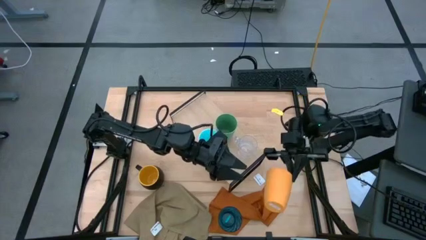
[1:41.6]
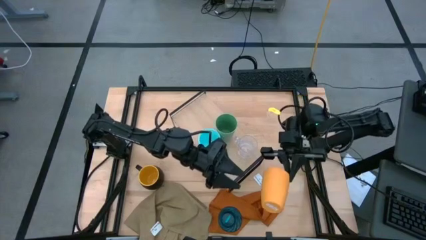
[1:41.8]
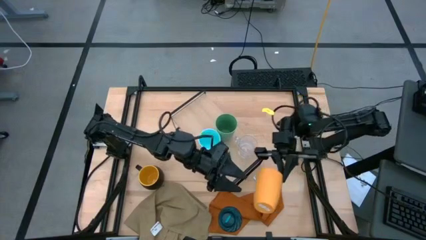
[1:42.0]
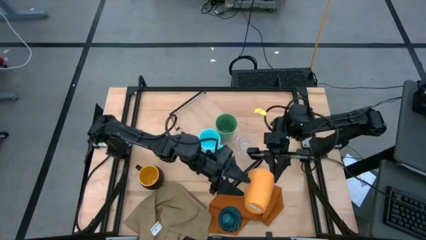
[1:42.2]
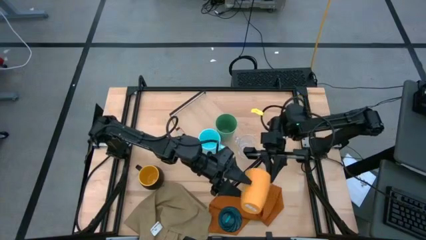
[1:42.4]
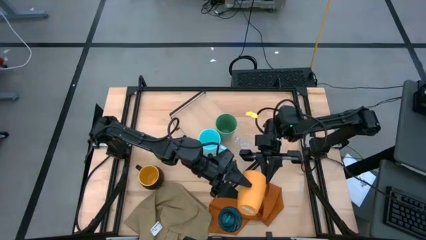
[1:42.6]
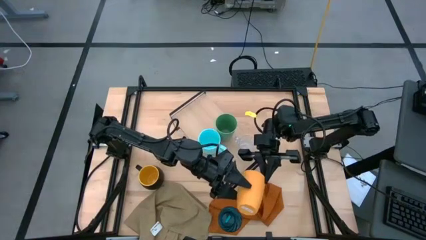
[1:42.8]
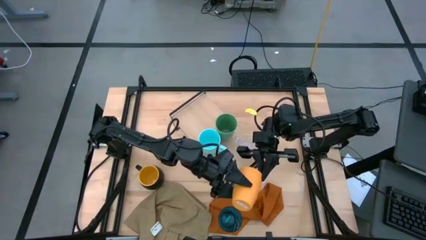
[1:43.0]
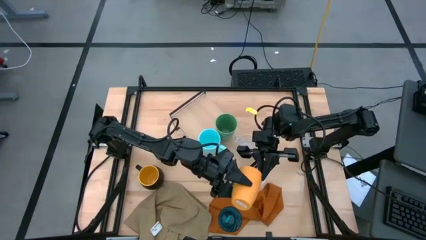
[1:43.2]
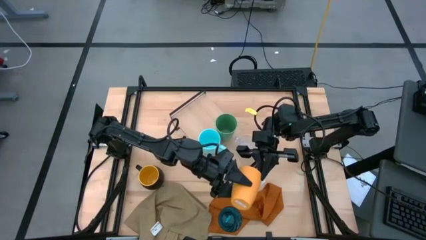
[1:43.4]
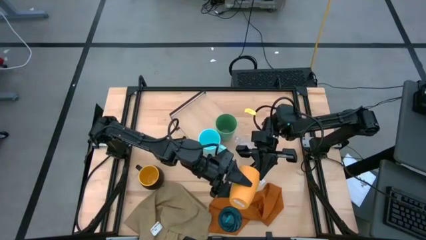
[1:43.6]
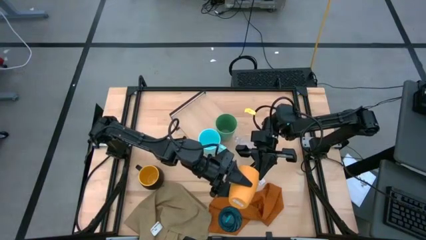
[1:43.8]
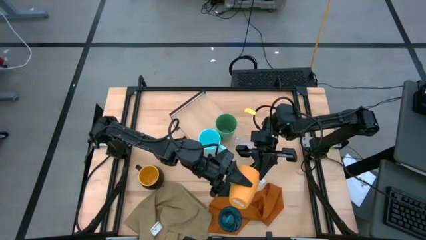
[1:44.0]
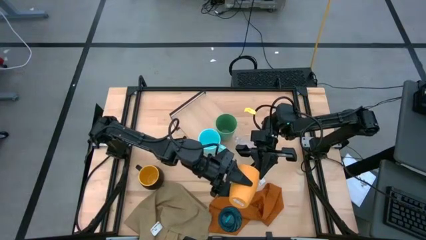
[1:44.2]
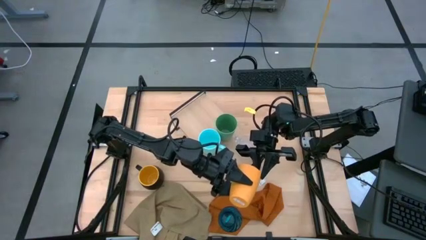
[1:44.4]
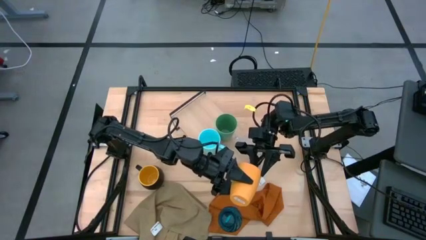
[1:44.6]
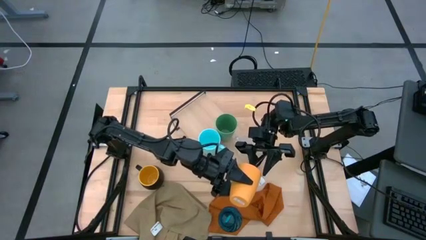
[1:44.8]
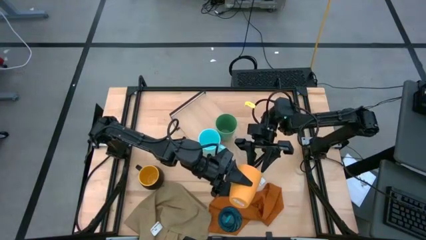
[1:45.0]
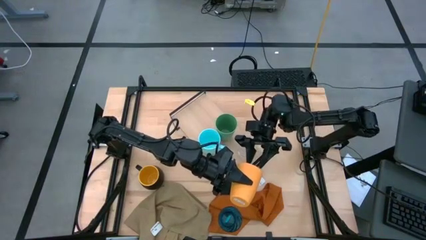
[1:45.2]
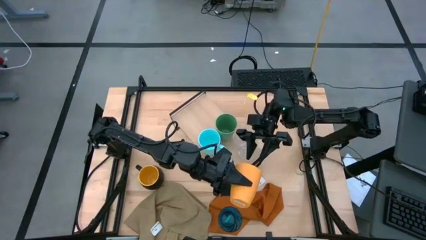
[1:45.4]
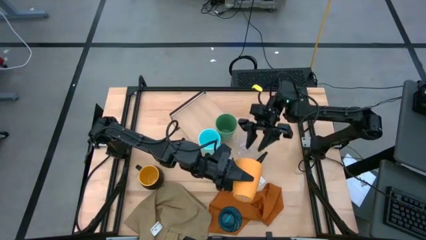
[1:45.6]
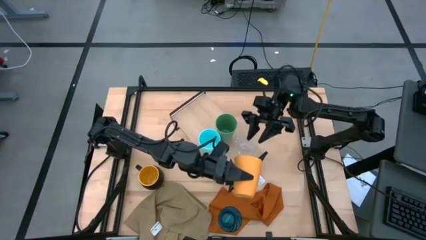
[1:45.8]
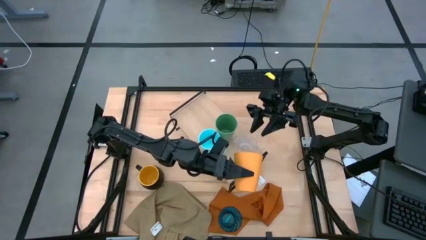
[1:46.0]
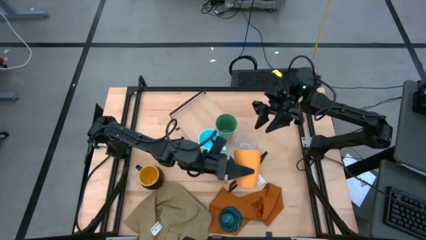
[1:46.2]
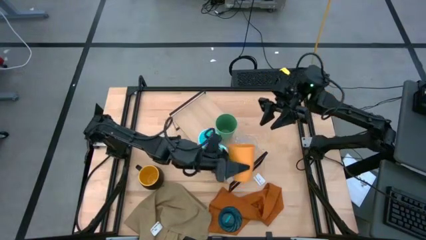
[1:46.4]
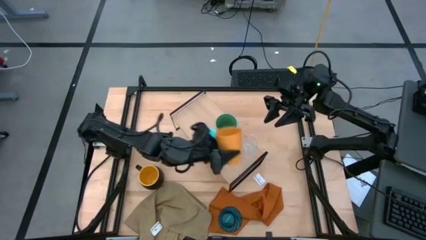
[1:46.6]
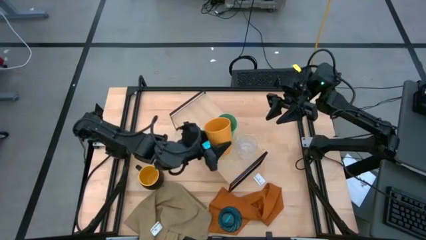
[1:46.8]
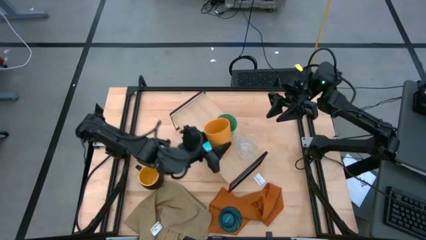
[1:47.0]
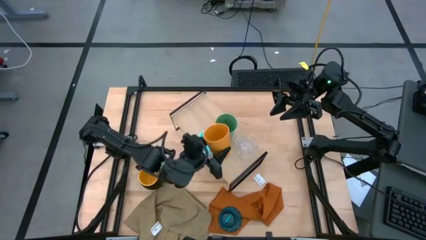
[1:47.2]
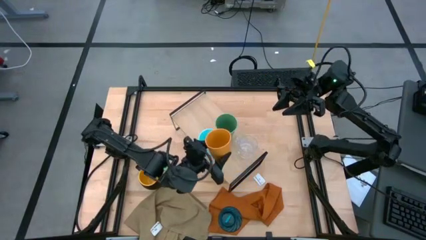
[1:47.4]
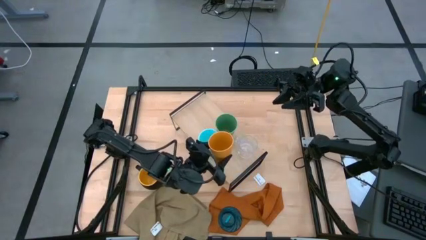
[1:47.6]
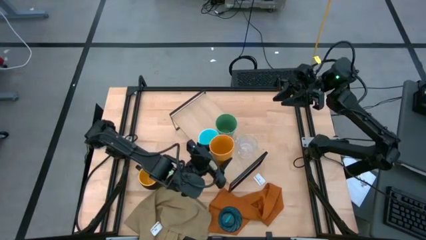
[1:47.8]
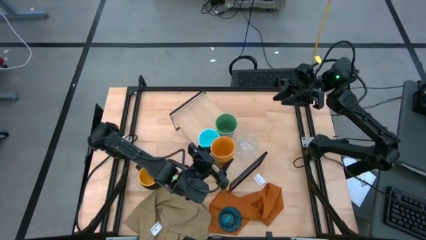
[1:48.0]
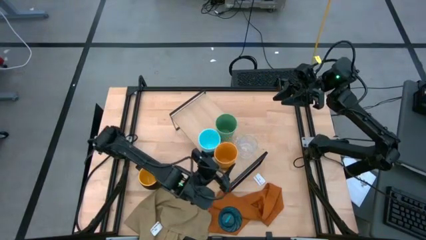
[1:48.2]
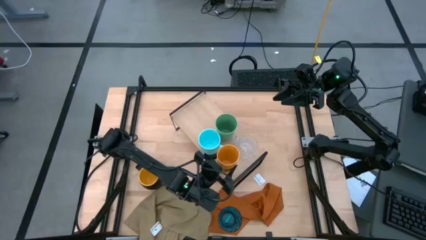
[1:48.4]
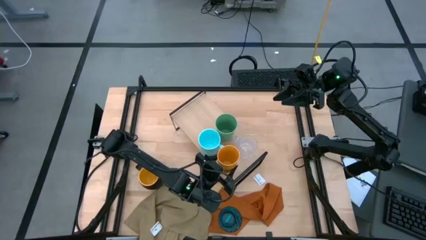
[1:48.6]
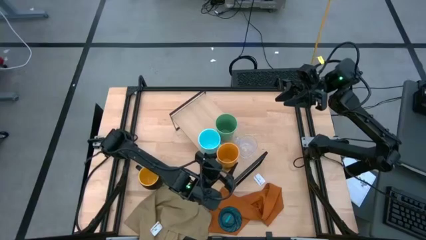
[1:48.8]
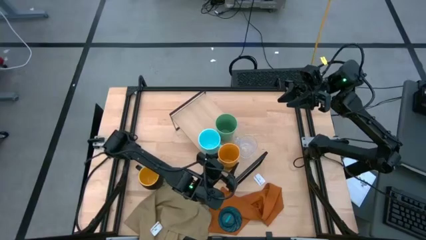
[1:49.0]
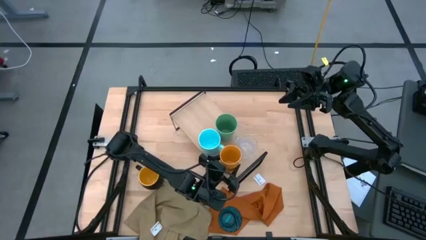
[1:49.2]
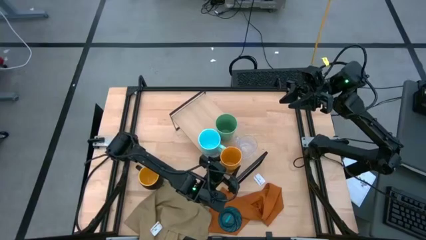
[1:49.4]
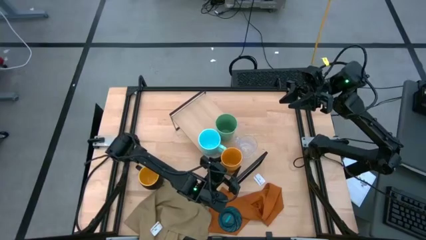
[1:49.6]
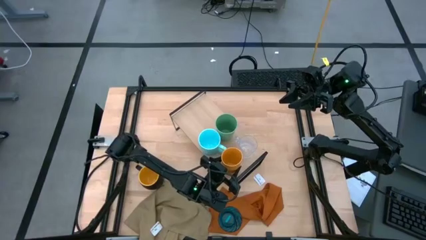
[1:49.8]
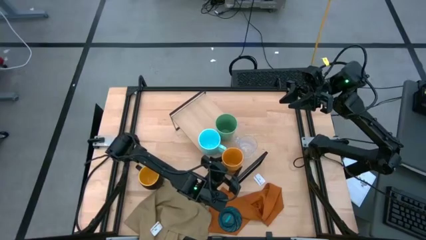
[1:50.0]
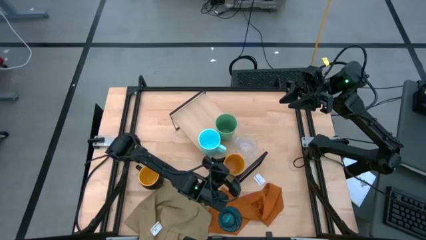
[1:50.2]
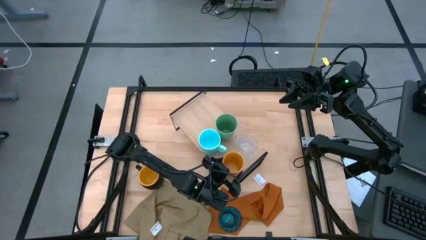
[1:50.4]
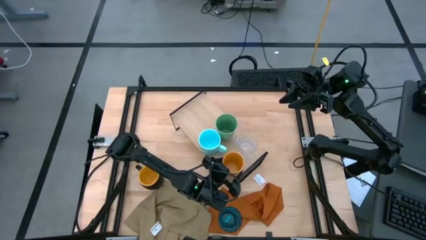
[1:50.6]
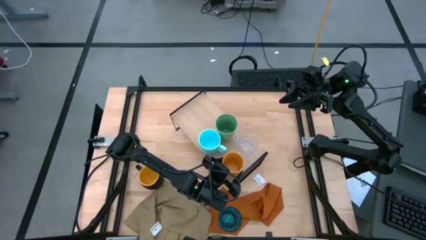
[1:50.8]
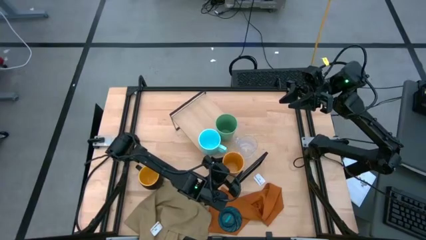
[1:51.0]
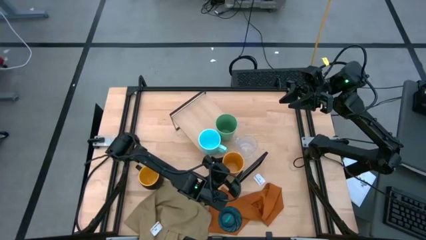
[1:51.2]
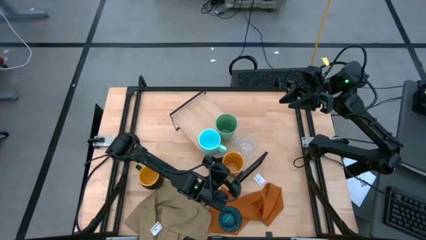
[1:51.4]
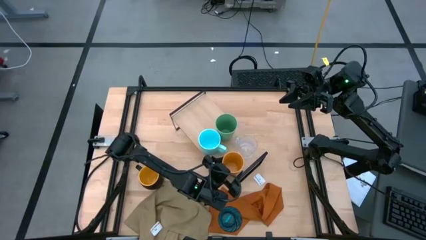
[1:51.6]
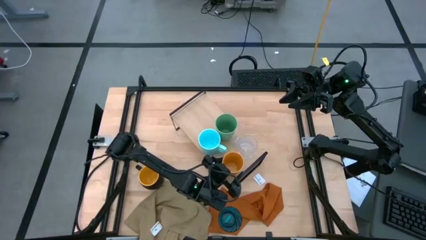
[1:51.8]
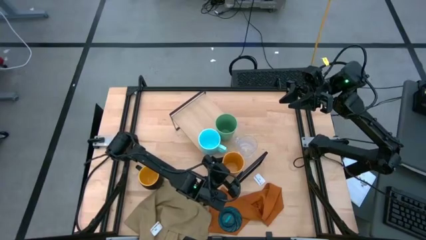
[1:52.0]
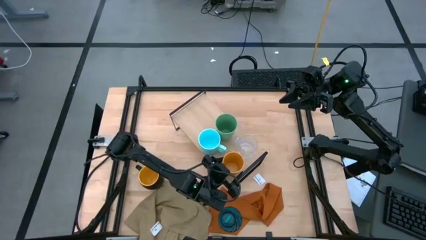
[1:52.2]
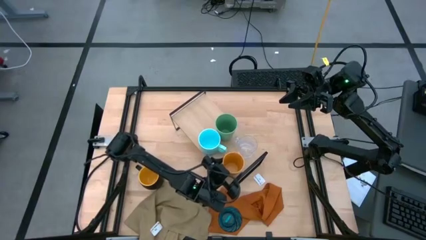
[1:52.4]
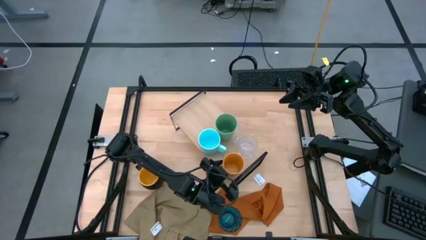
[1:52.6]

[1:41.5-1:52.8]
Task: Stack small to large cups/mugs on shelf
Put the yellow cup on the shelf

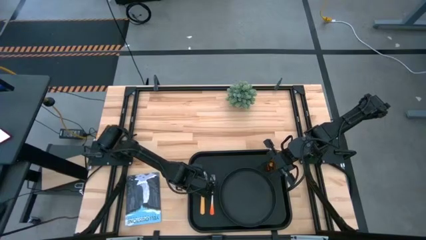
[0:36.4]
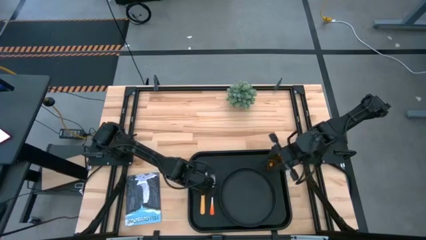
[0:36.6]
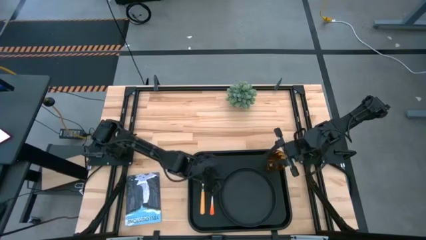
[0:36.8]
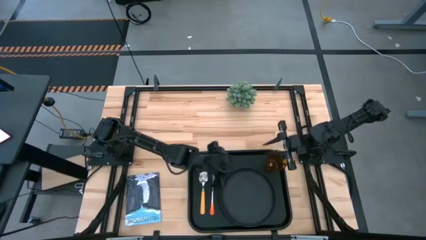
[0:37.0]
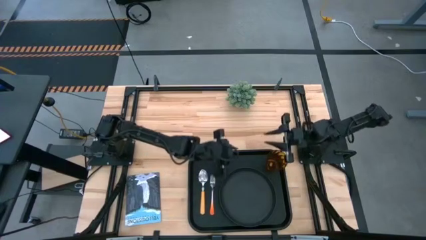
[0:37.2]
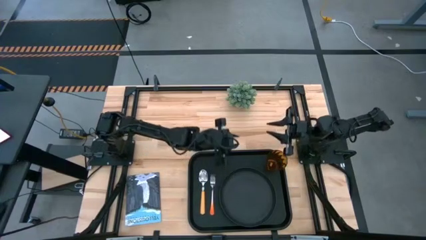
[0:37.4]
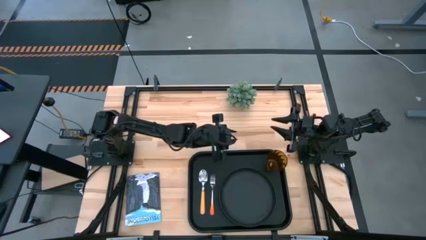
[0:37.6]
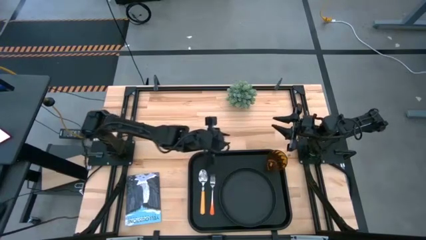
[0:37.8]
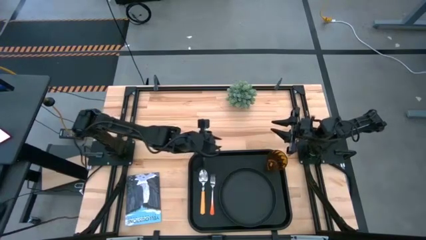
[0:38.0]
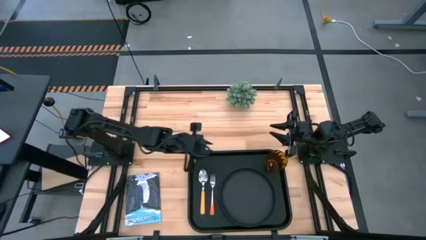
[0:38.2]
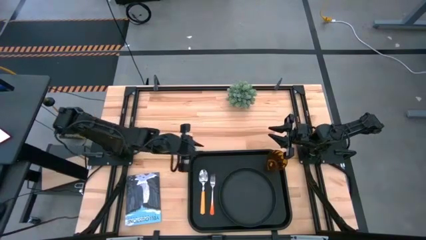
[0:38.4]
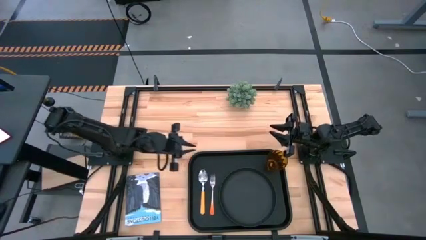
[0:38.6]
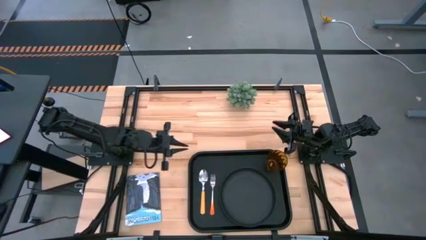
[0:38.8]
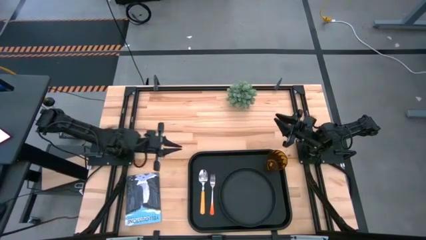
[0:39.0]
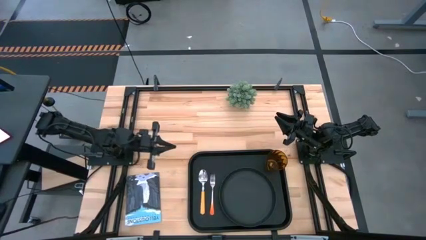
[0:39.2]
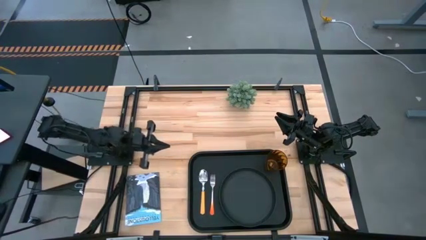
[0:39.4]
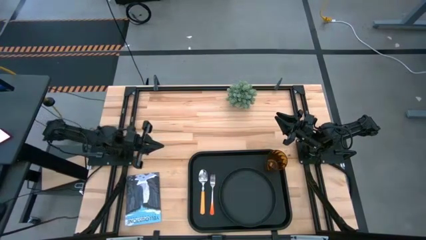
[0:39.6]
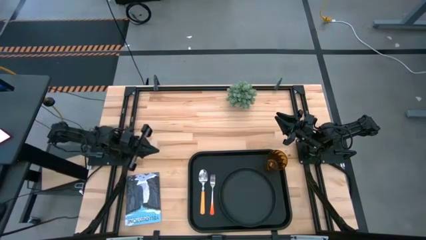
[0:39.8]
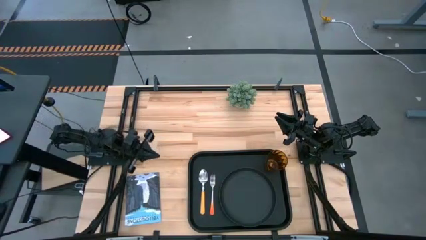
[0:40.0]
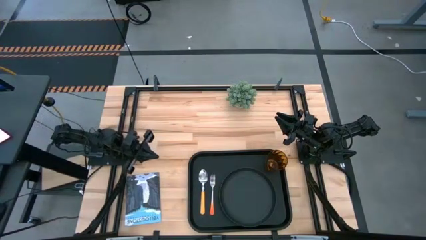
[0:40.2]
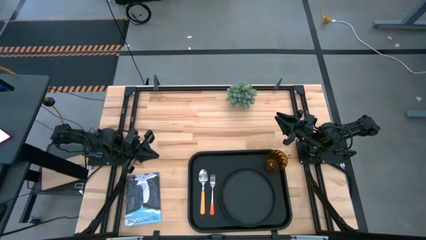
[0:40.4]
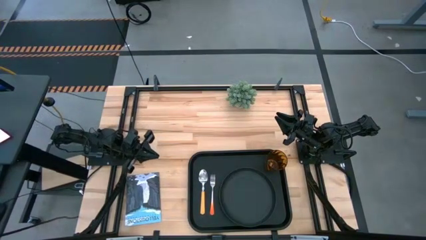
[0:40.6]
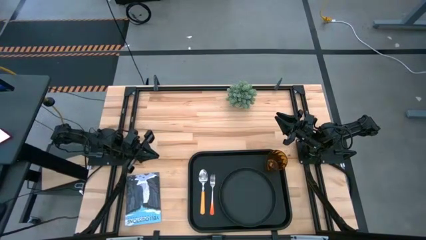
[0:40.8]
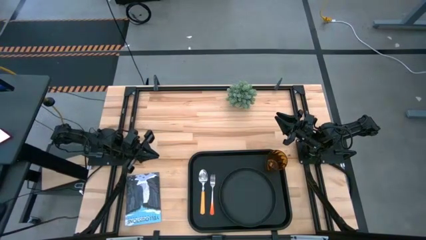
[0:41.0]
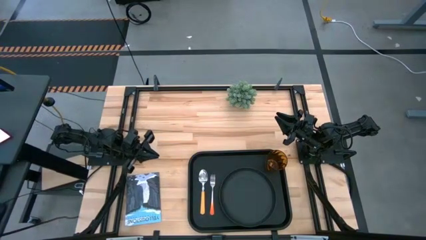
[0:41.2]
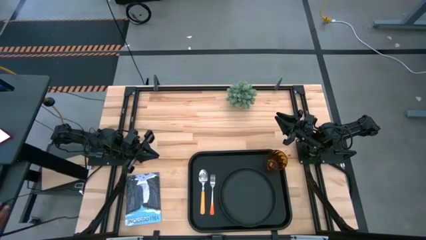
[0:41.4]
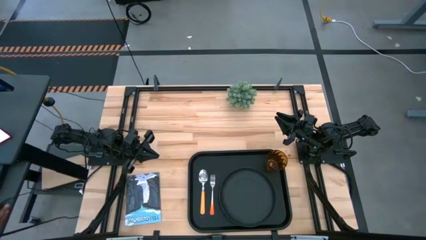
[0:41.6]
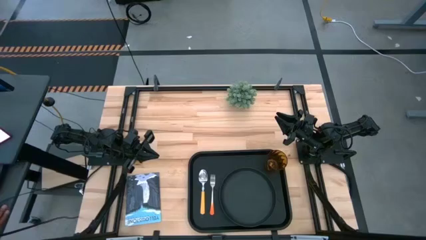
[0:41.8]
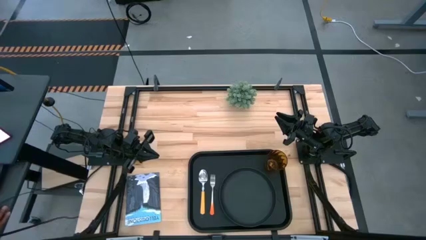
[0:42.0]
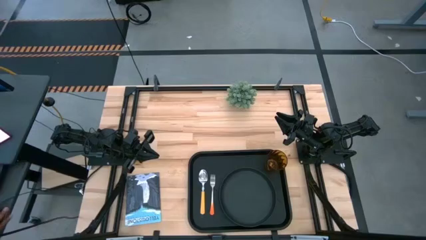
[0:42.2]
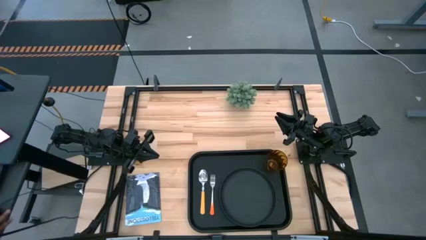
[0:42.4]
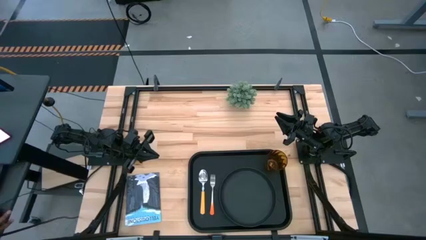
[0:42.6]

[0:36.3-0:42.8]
Task: Pick and place plate/cup/fork/spoon on tray
Return to Home Position
